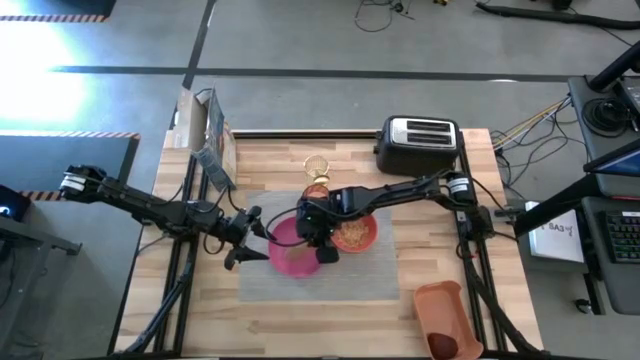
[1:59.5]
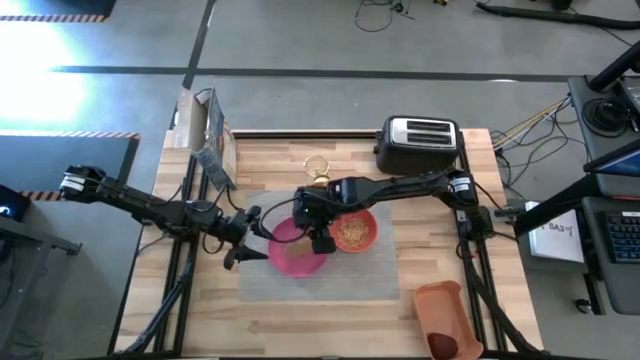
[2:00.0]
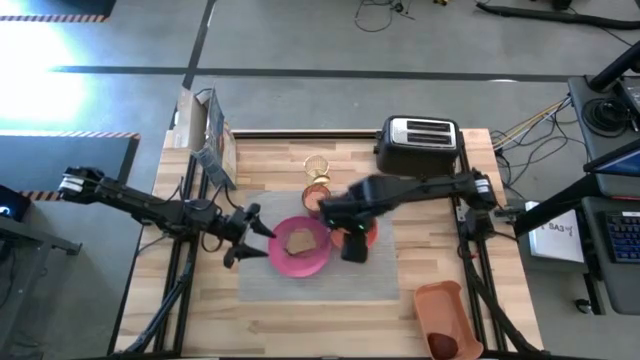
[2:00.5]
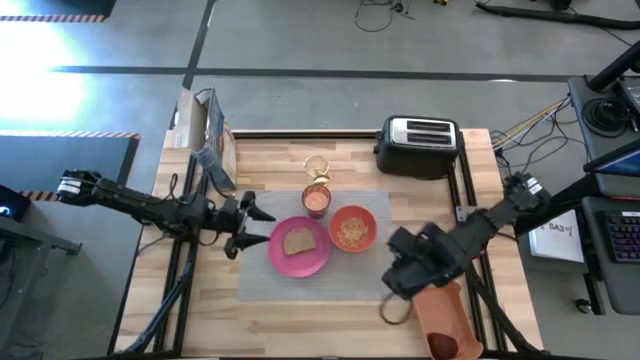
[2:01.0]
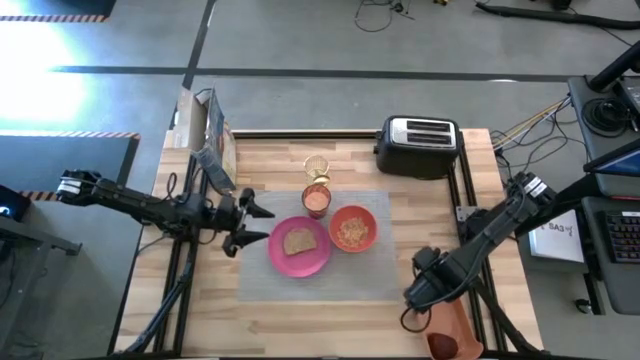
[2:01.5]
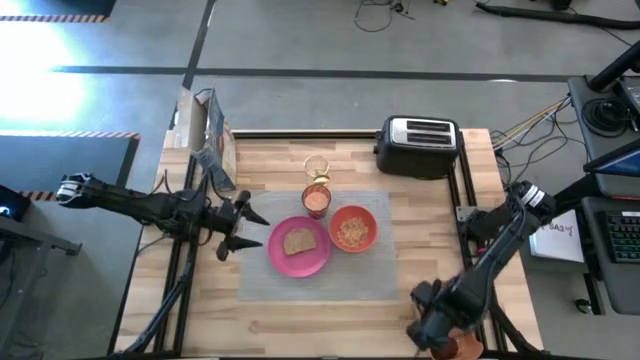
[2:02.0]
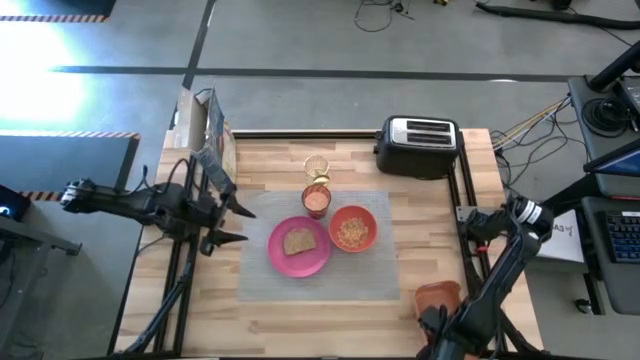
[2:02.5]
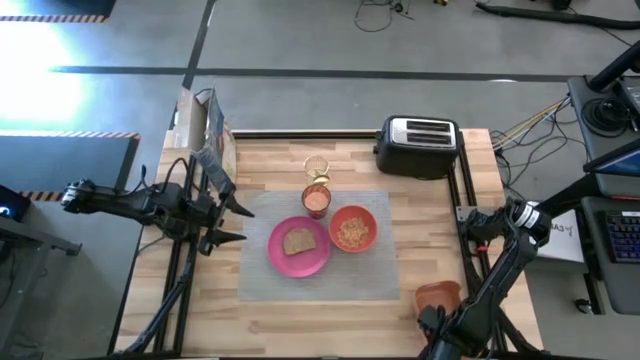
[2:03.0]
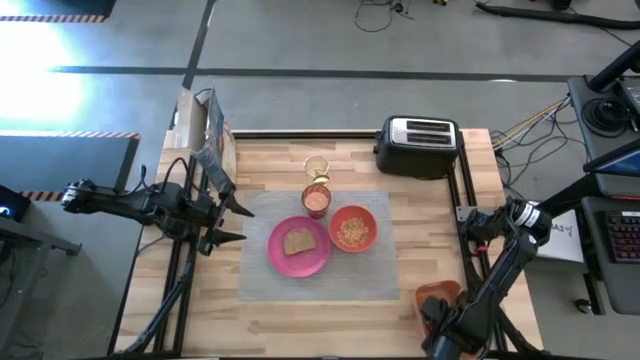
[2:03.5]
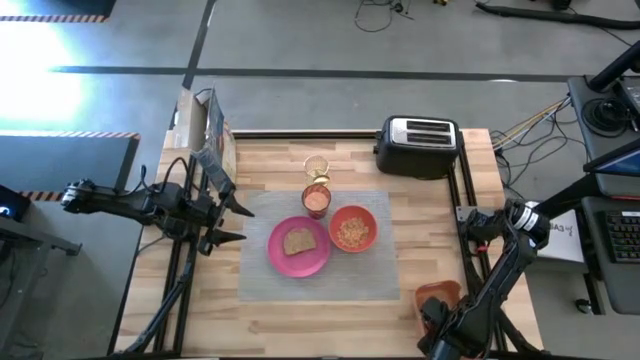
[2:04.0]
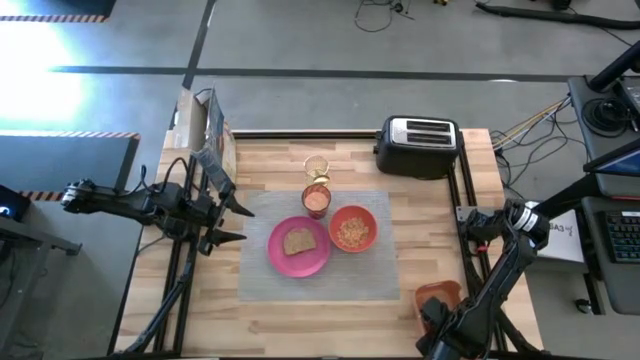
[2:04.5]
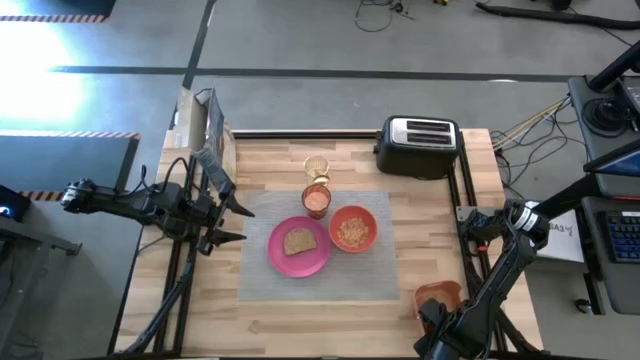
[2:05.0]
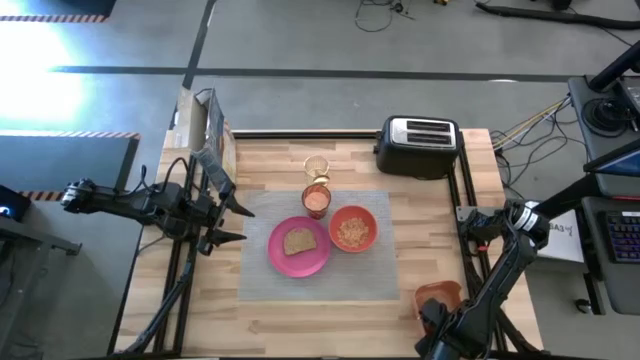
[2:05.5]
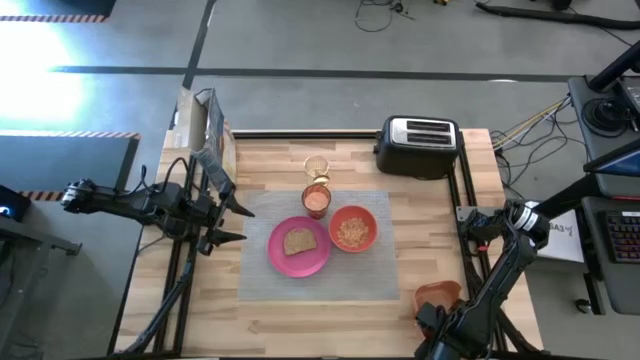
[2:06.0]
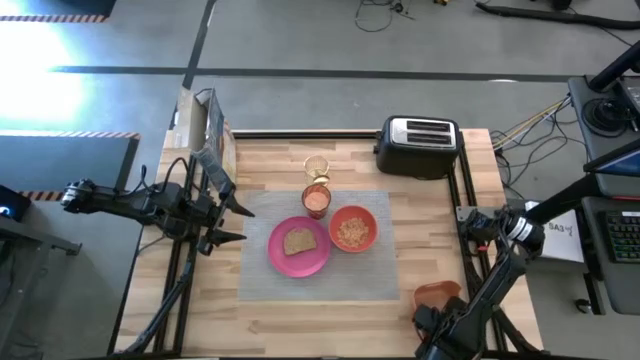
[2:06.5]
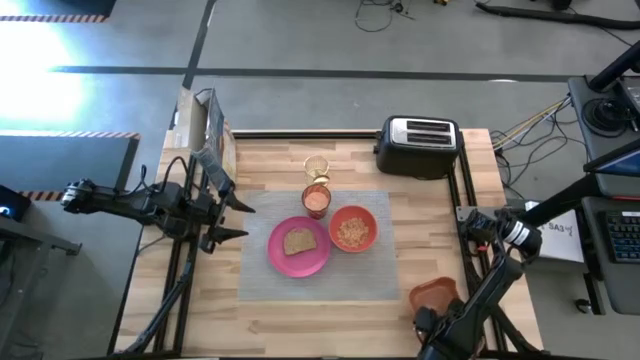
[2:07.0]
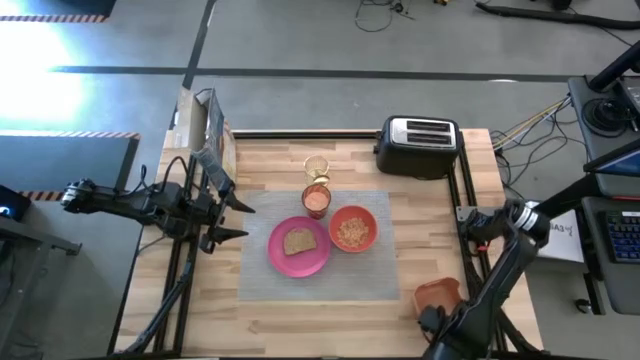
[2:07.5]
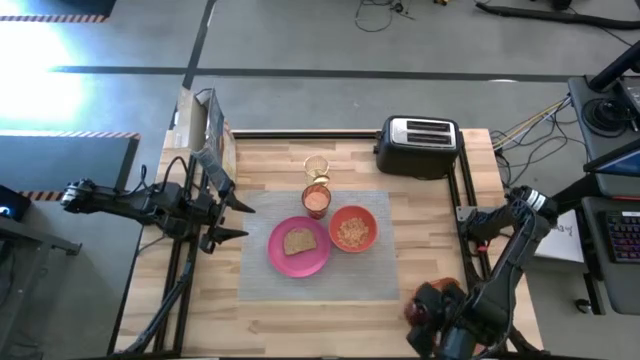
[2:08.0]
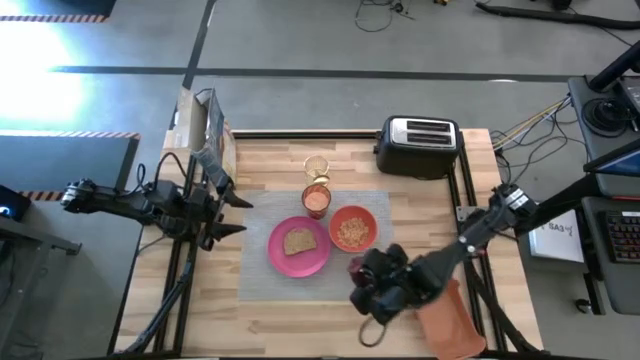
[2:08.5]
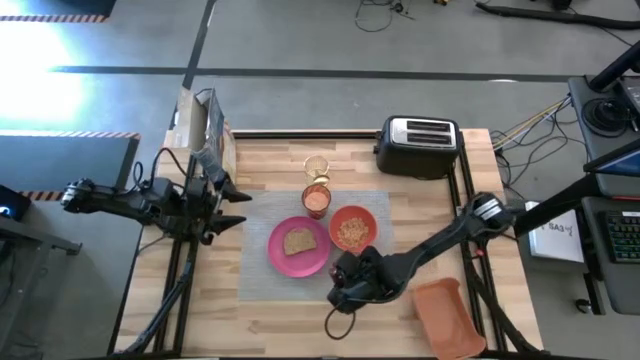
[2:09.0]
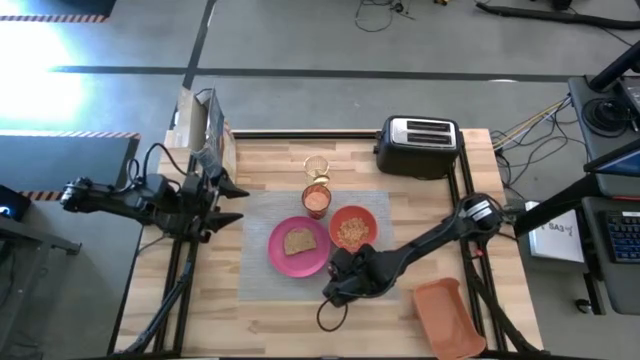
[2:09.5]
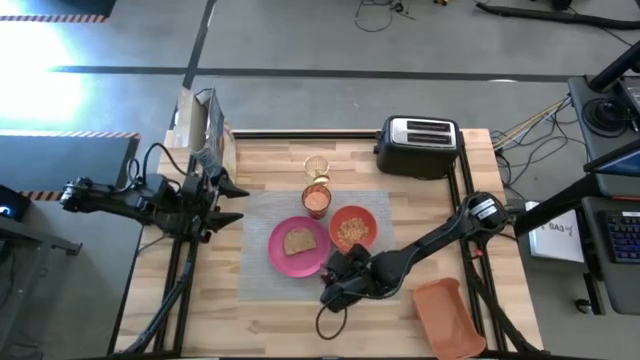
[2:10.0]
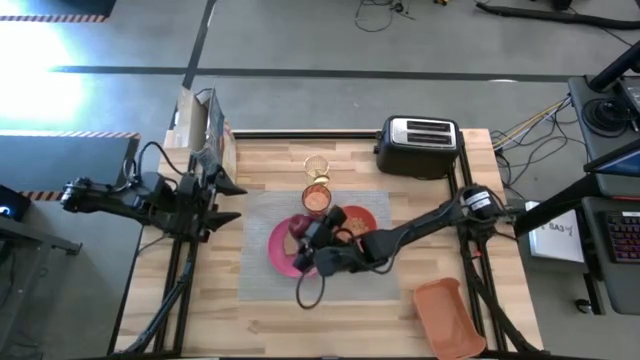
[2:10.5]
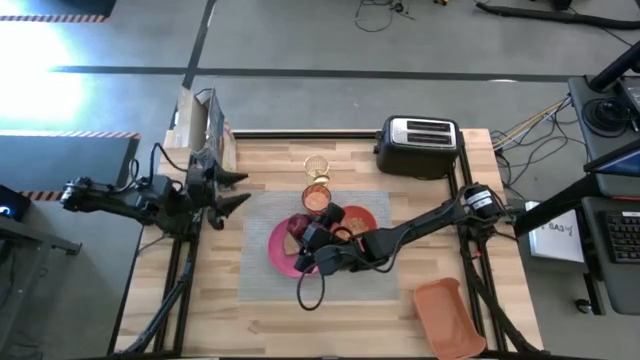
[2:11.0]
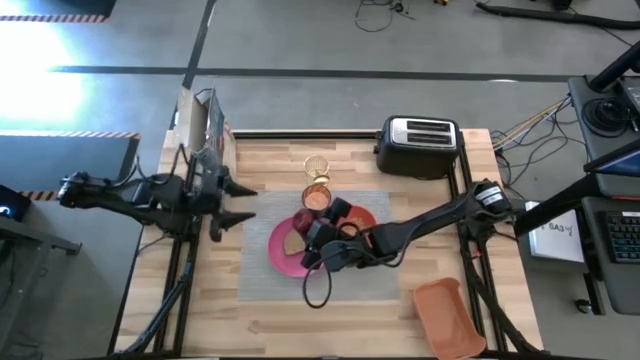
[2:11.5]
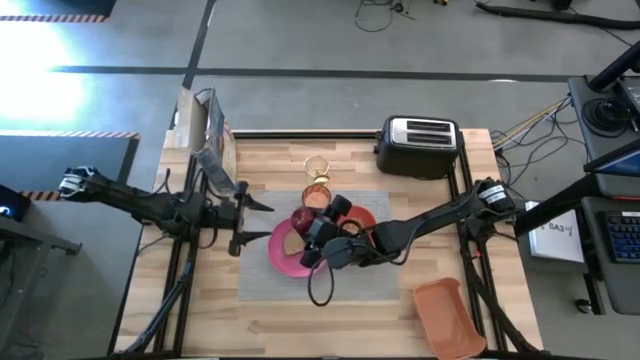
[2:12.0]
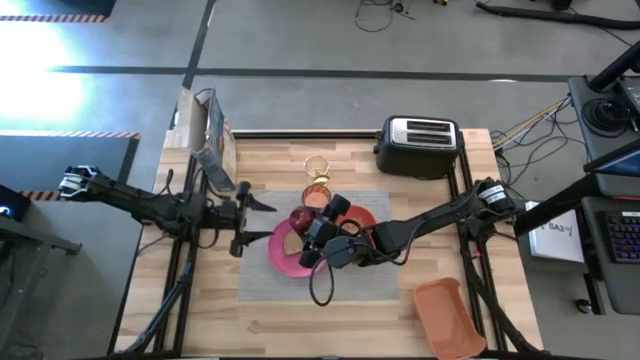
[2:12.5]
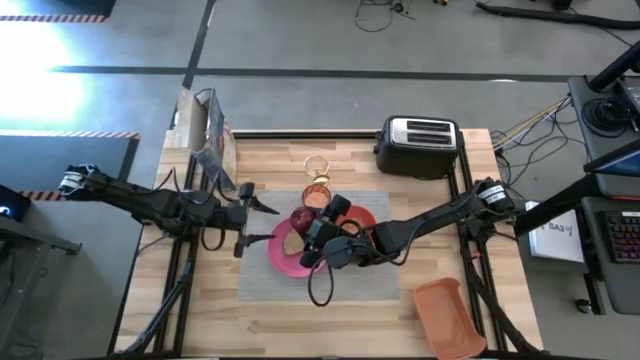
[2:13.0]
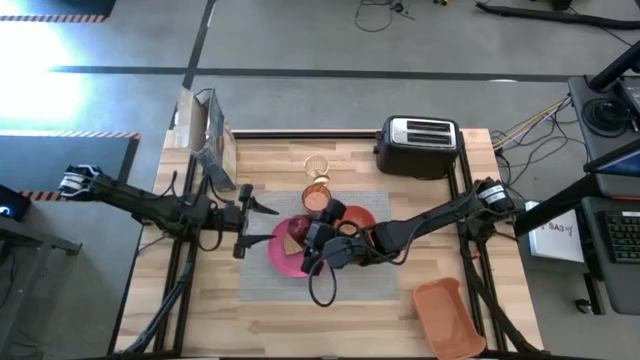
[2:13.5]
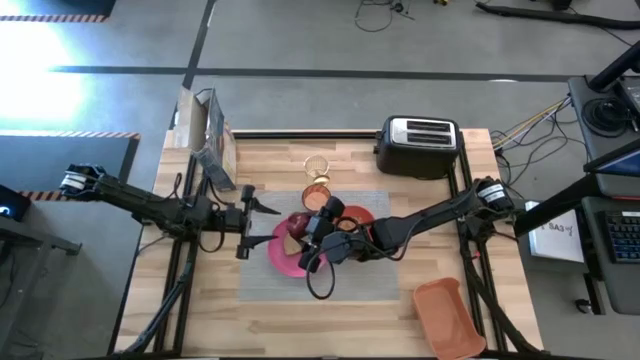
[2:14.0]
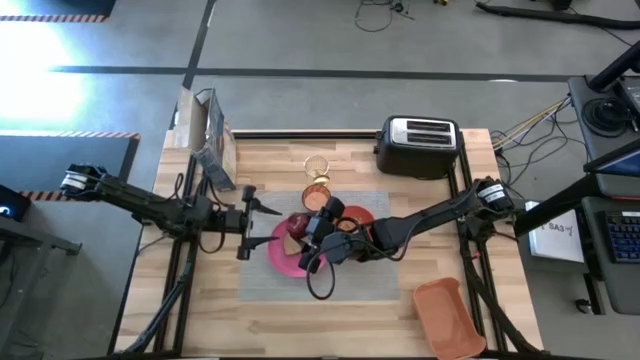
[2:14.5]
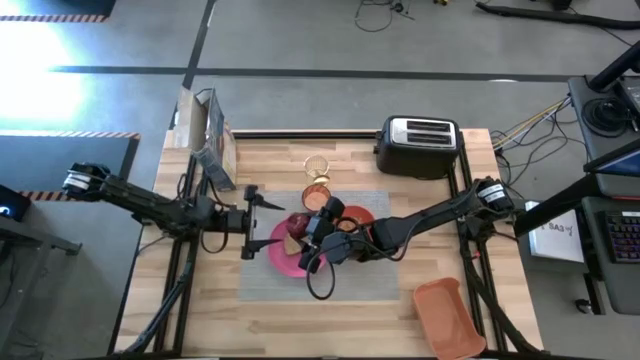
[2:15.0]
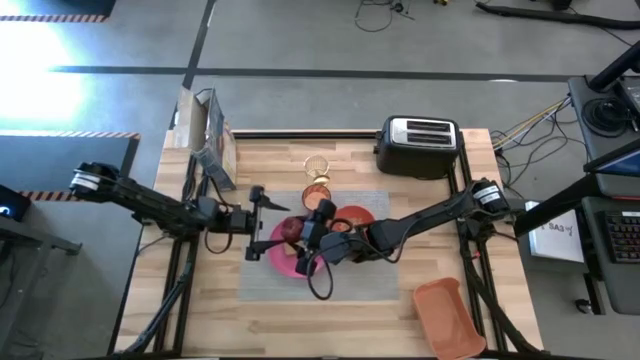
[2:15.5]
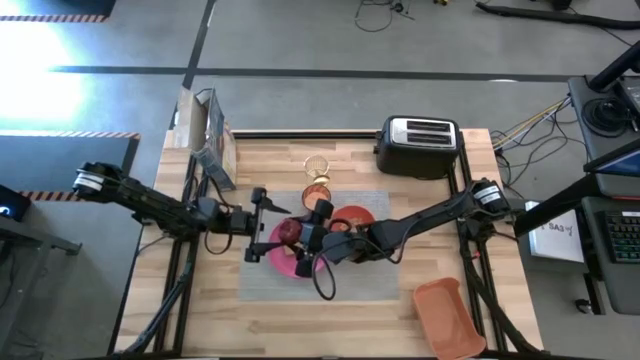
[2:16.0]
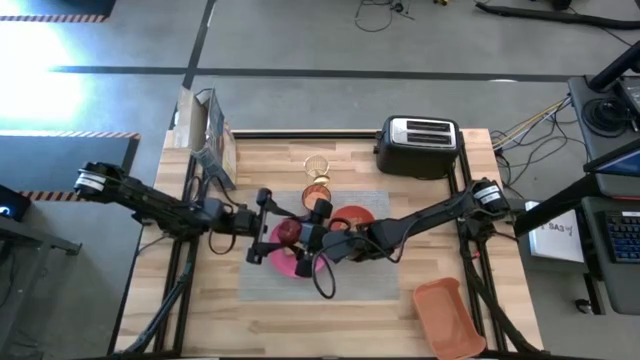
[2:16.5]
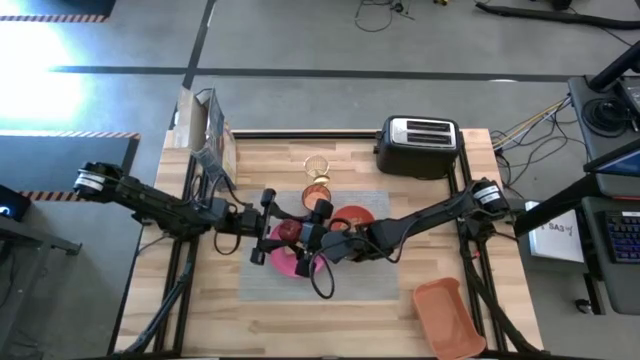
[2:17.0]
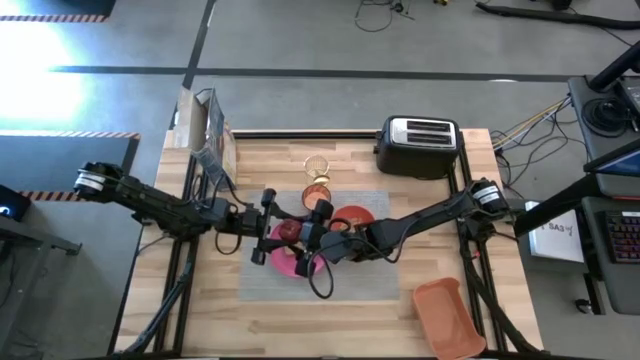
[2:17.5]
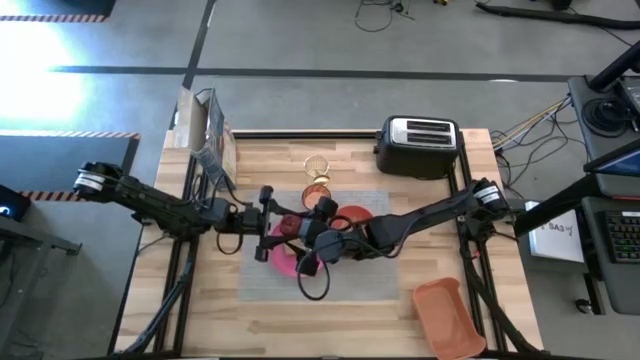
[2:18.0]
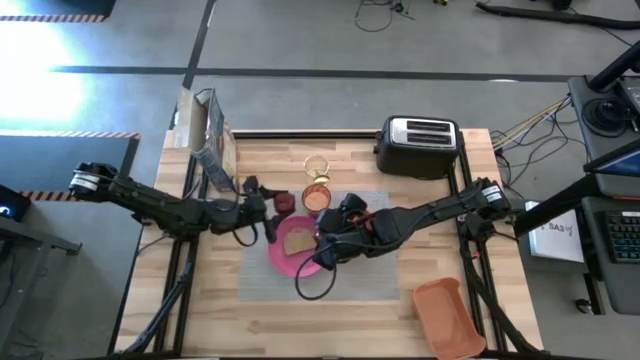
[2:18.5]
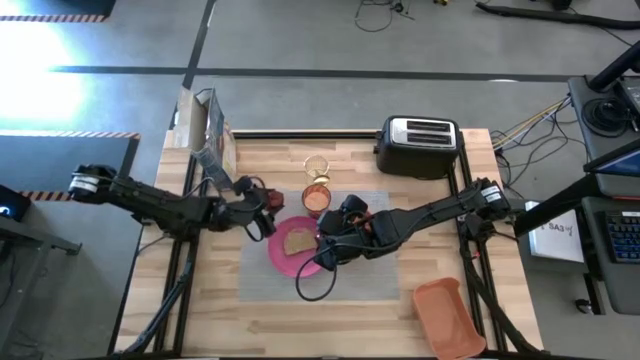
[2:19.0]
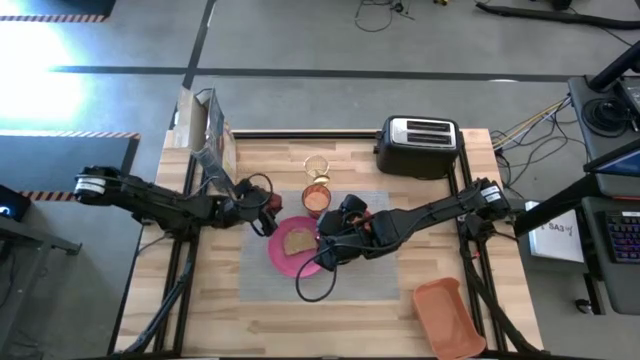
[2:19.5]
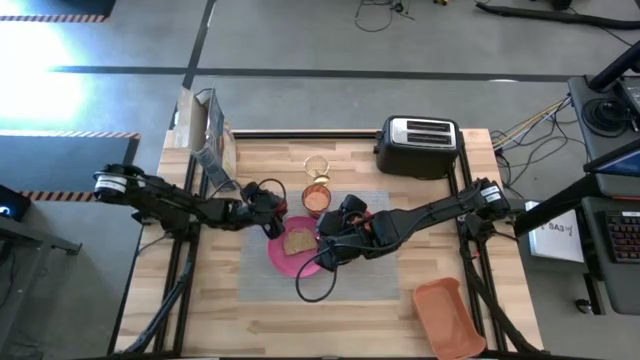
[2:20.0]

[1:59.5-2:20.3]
Task: Arrange a breakfast setting
Put the red apple to the top left of the pink plate on the table mat

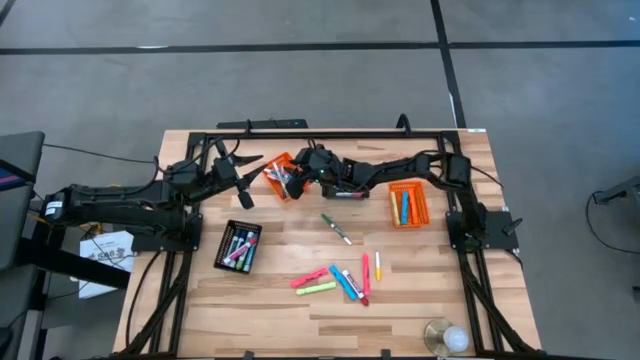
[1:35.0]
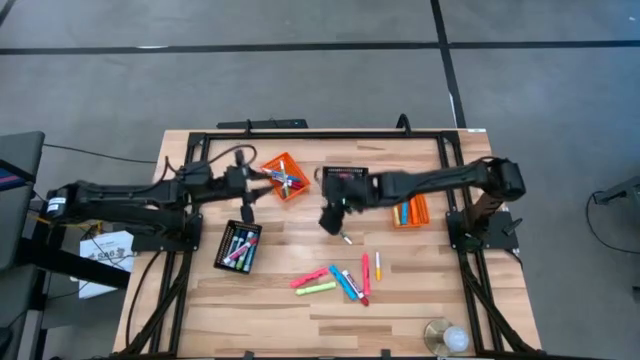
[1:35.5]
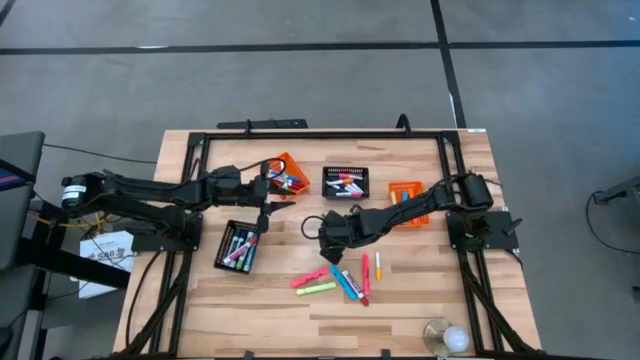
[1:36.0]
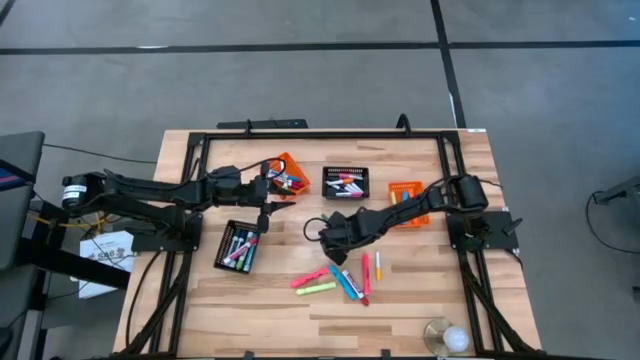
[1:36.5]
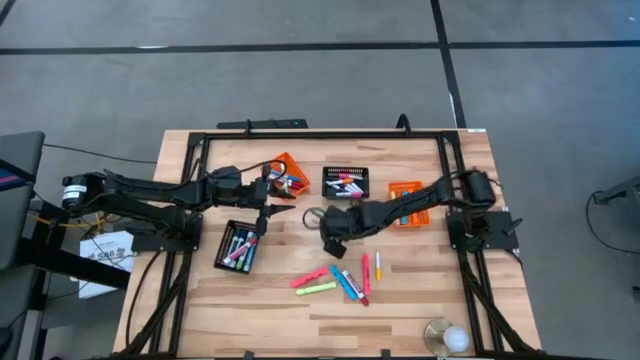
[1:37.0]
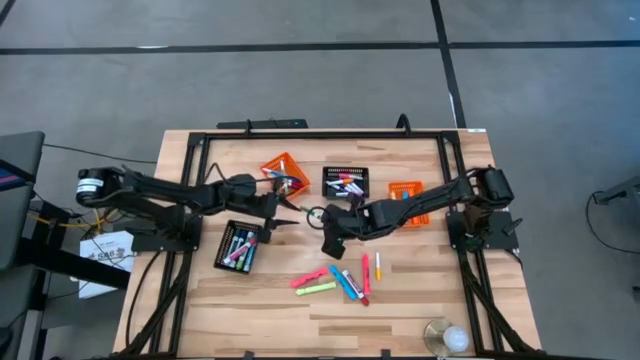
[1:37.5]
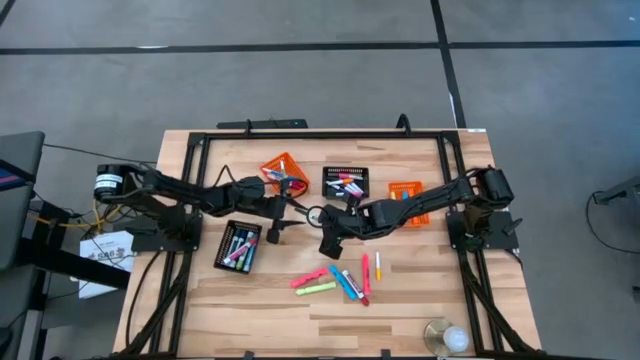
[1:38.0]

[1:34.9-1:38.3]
Task: Pick & Place Markers
Put the green marker into the left orange bin
